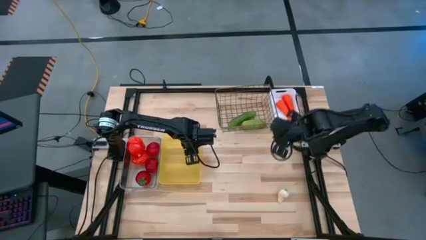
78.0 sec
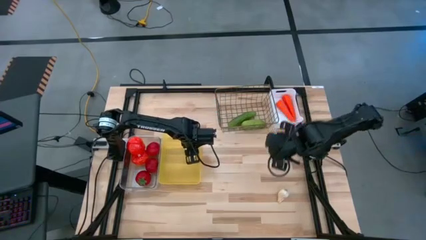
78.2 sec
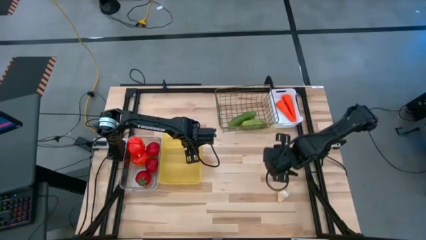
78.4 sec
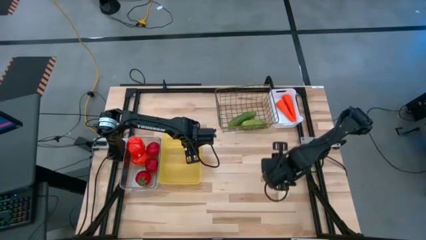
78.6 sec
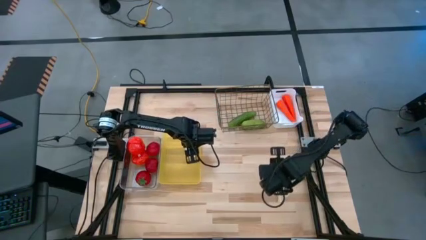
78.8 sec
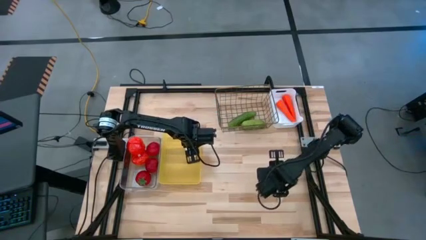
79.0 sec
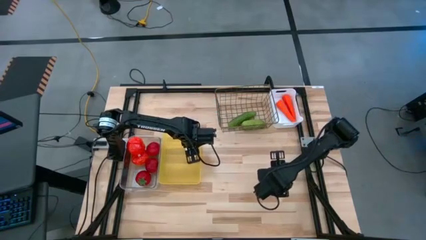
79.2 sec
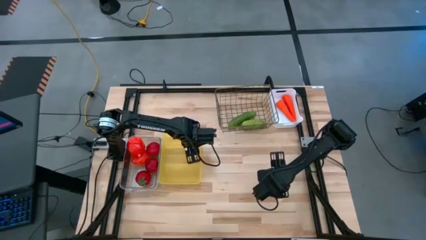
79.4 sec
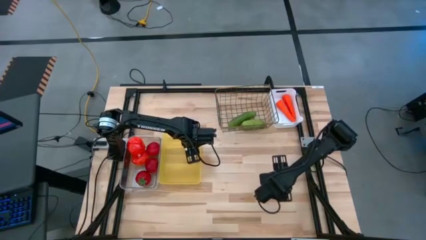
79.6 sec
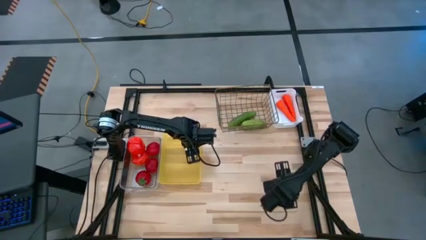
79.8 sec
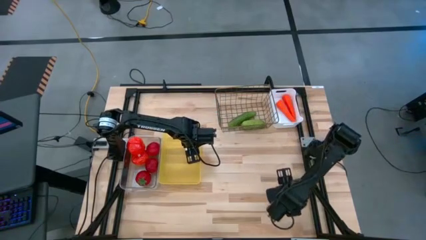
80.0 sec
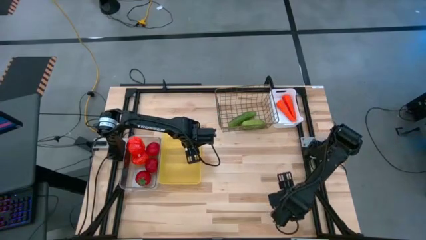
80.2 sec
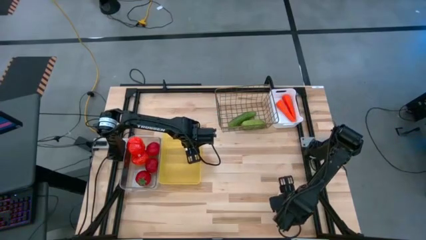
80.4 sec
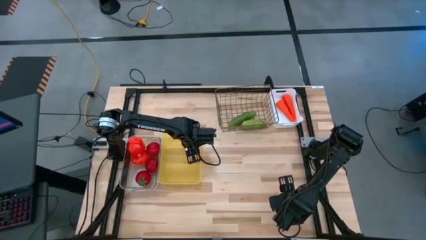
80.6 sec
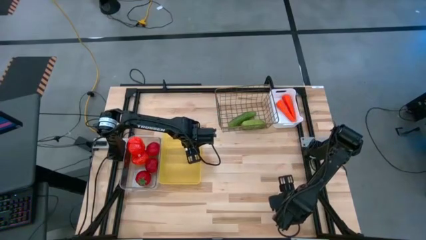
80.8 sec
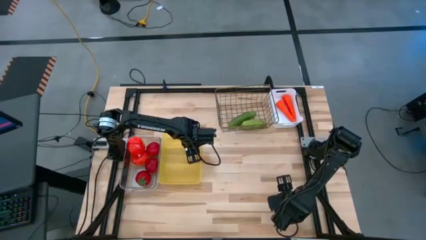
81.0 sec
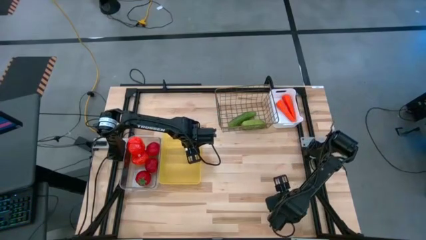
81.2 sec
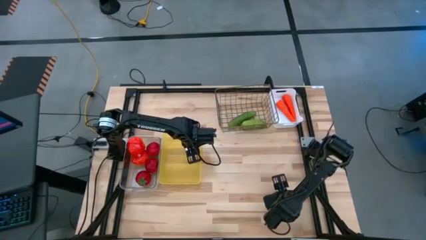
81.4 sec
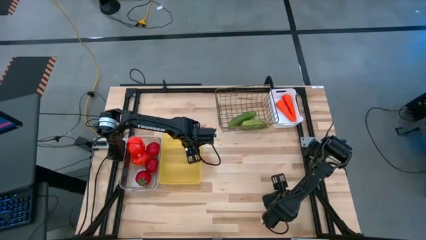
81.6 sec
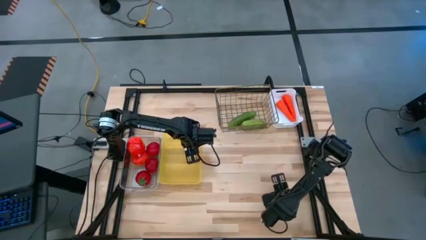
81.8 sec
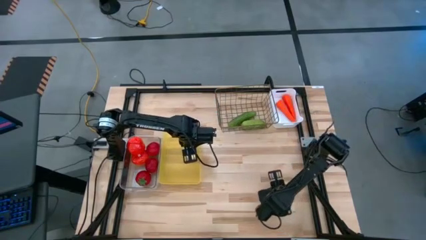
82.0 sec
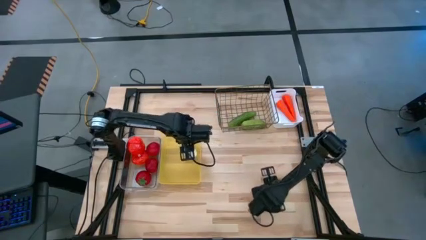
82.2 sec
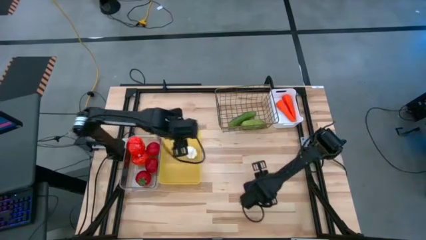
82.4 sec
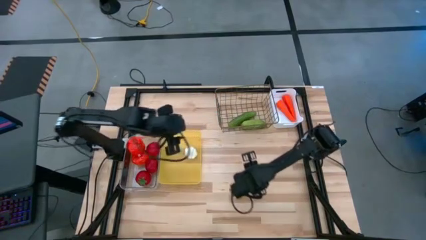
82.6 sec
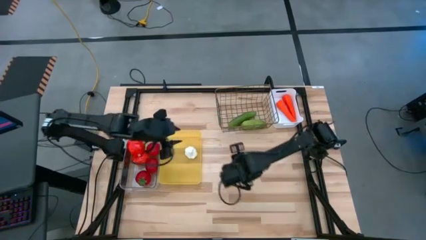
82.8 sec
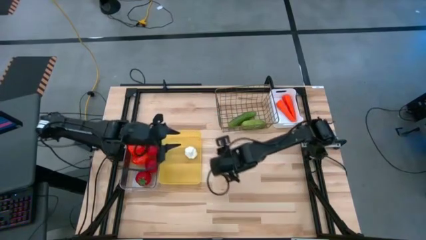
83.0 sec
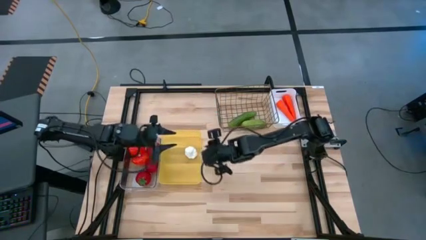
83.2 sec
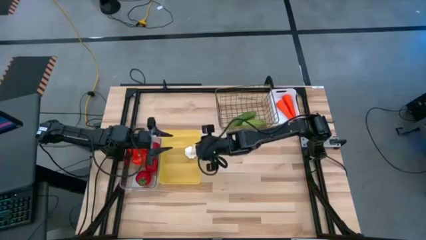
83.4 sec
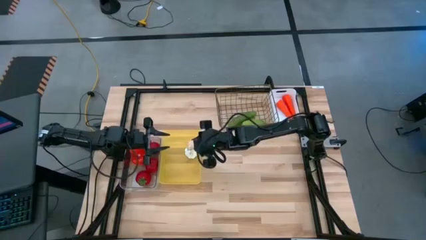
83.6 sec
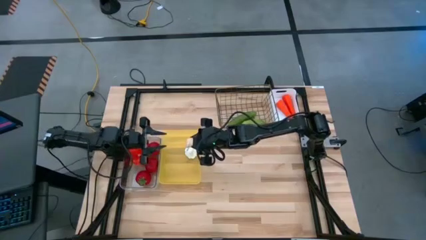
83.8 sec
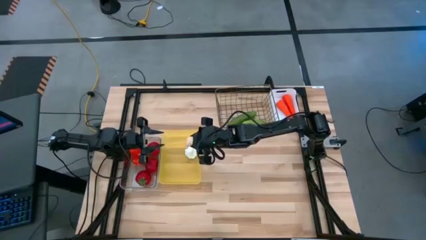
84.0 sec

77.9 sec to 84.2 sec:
Task: Sort produce into baskets
Put the white garlic into the yellow bin

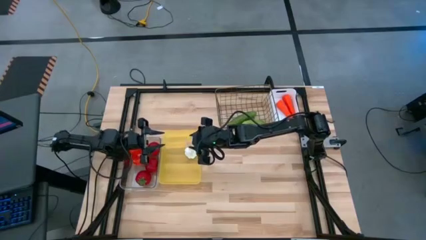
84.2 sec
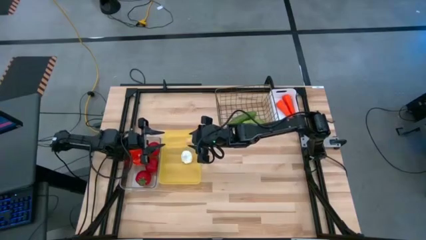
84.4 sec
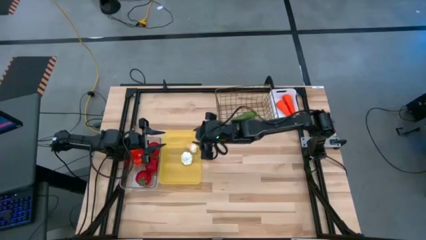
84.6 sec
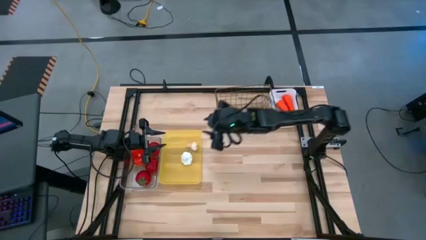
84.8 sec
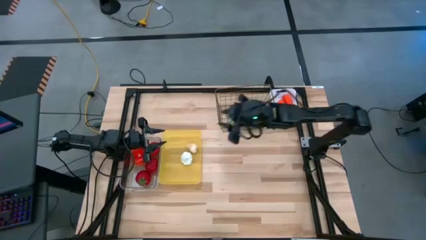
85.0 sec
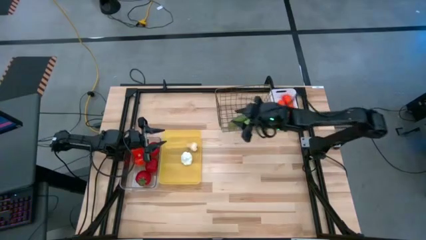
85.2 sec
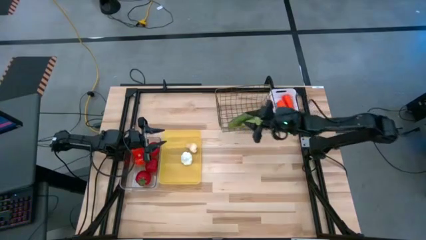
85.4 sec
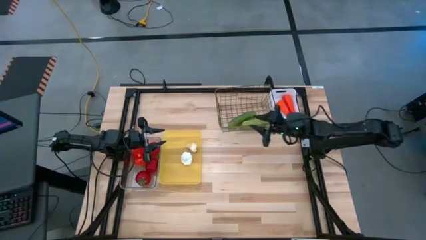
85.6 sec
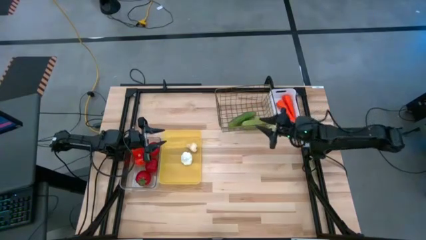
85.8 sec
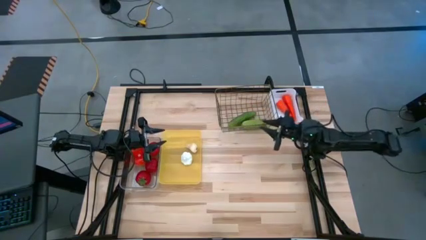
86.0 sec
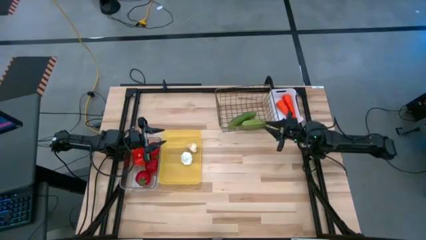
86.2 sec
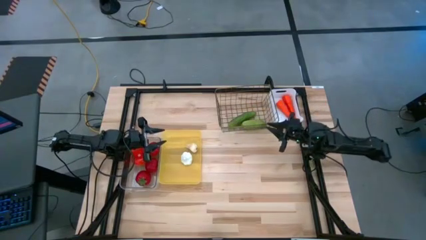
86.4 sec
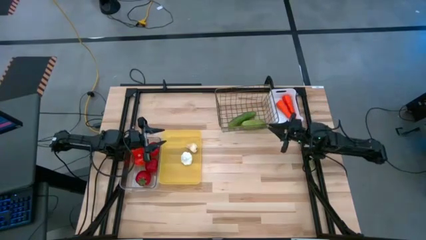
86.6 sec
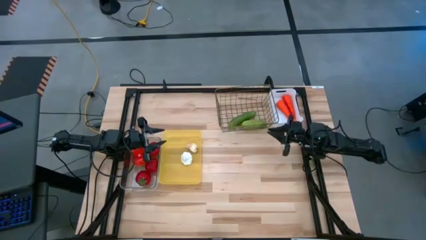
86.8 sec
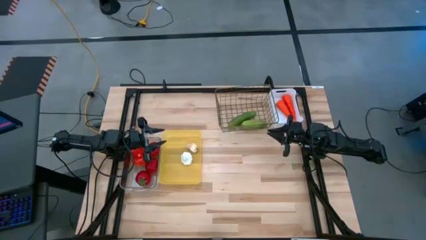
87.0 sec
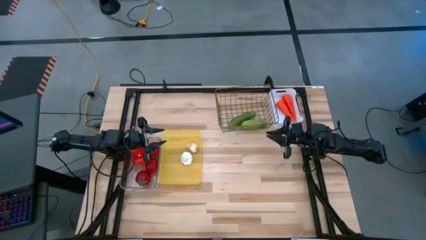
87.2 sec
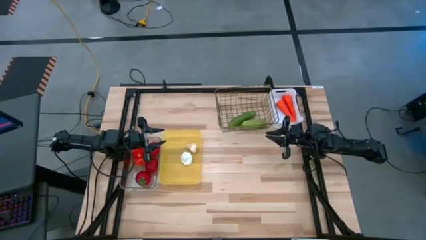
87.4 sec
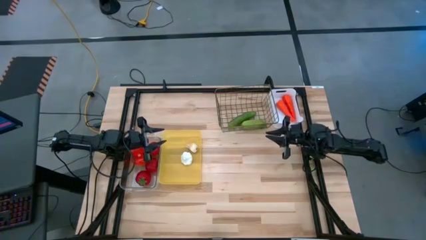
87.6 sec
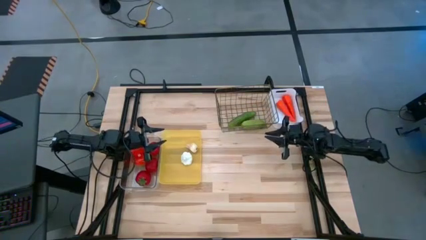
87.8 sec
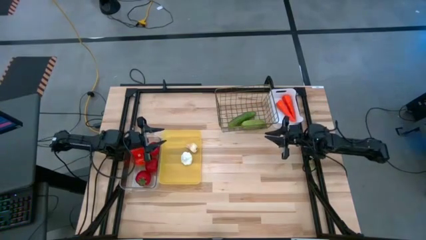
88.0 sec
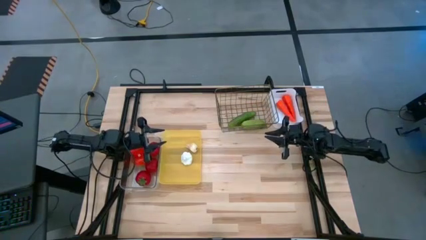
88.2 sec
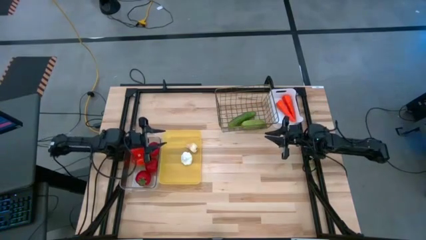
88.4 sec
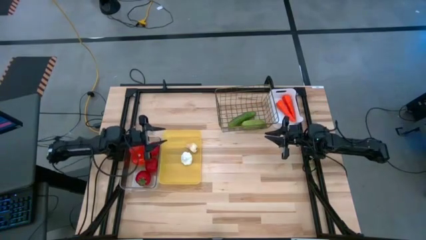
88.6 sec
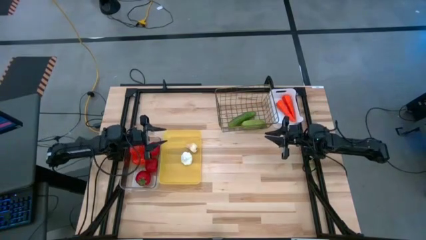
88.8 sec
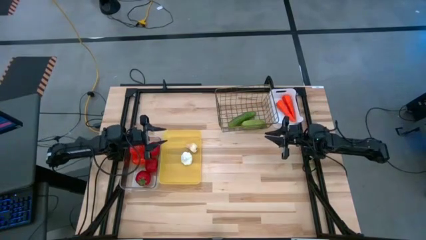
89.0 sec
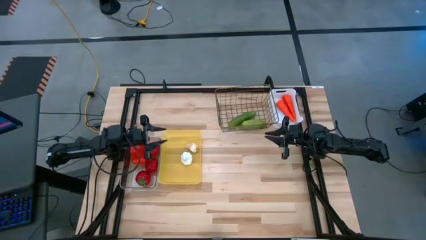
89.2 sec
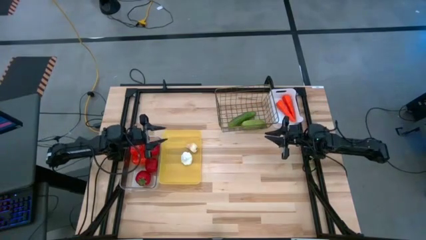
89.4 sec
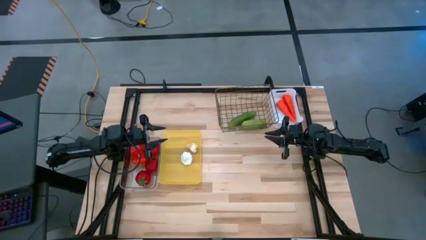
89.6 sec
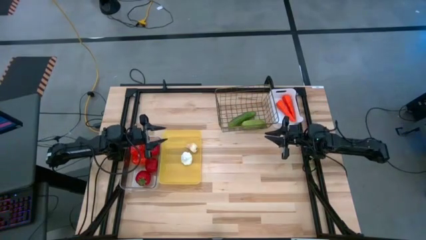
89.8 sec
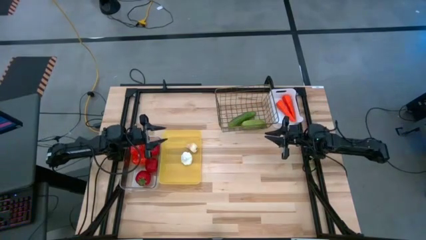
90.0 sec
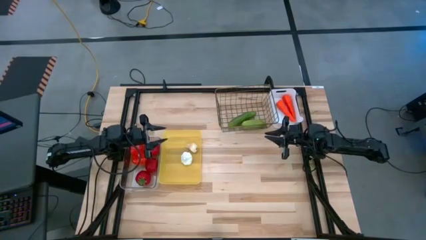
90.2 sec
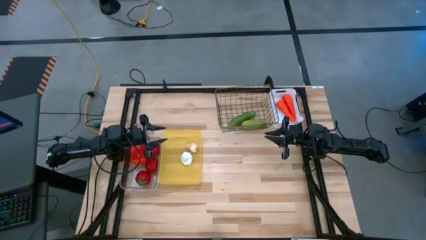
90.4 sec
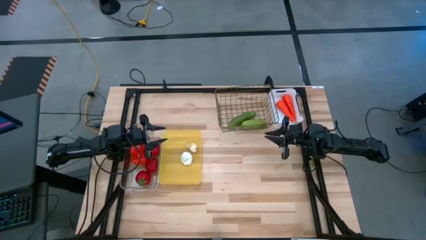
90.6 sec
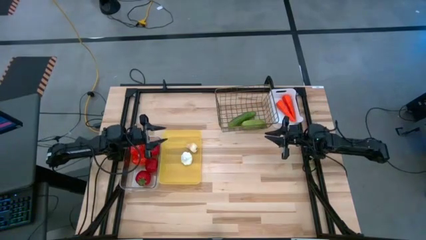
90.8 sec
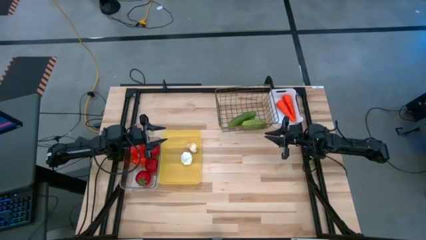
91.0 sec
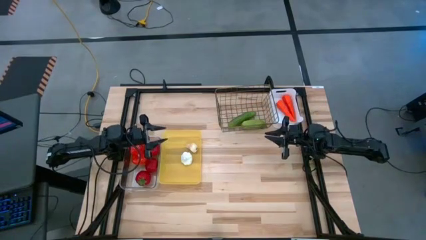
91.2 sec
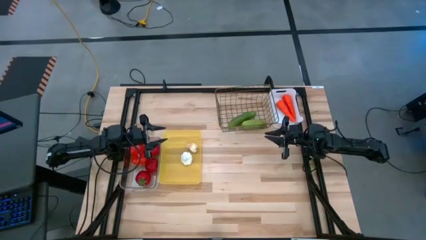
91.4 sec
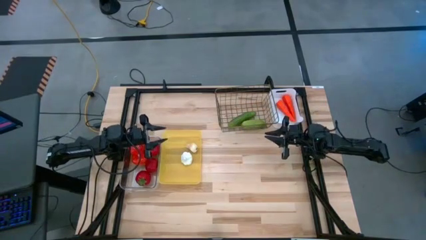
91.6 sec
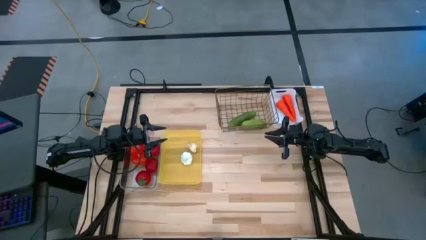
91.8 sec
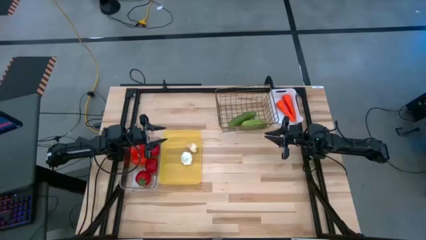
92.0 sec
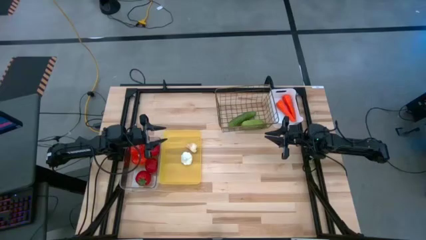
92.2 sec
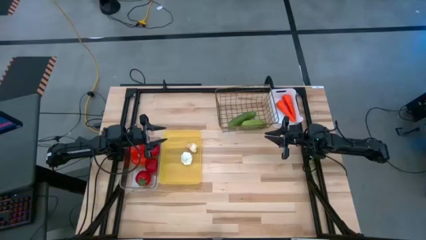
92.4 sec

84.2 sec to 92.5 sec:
Return to Home Position

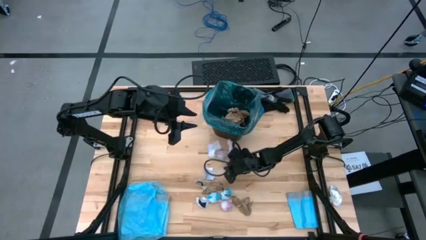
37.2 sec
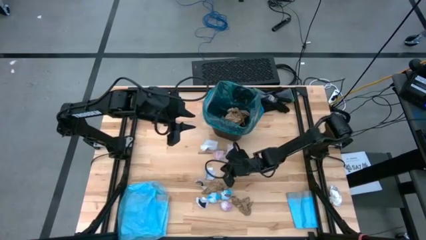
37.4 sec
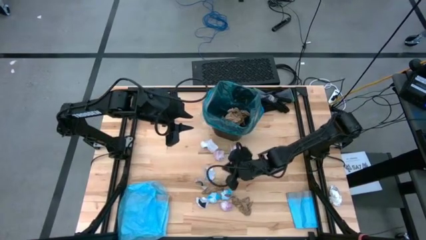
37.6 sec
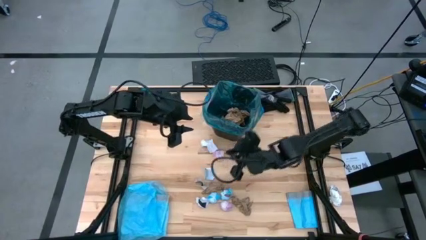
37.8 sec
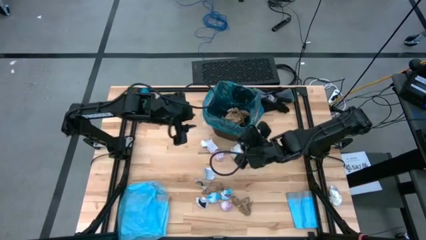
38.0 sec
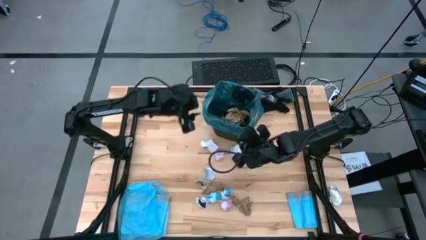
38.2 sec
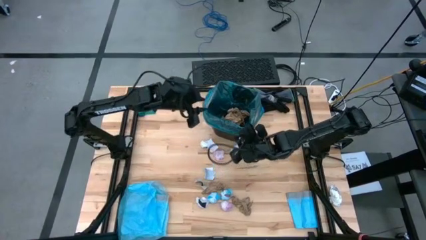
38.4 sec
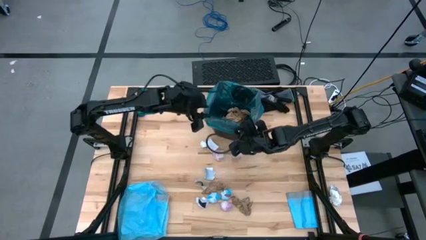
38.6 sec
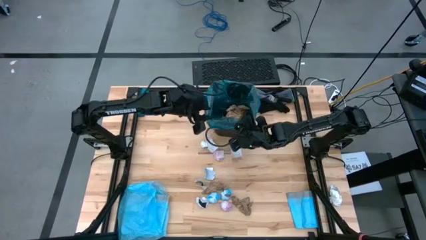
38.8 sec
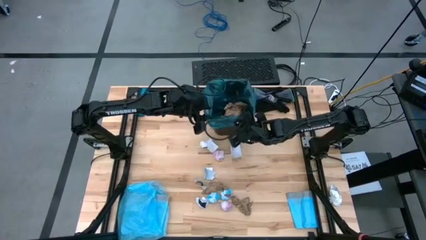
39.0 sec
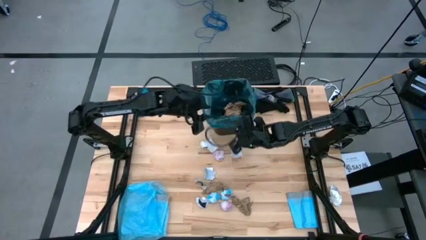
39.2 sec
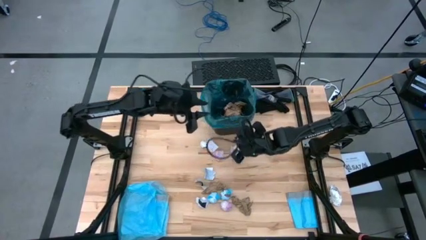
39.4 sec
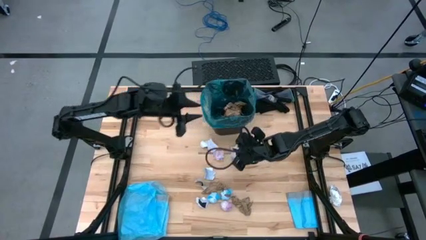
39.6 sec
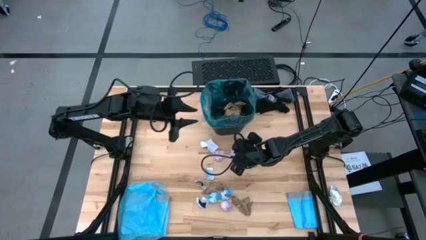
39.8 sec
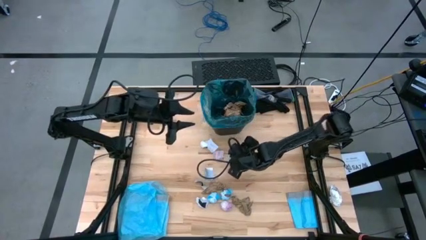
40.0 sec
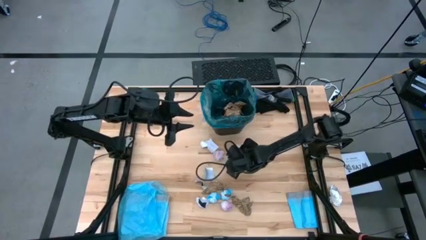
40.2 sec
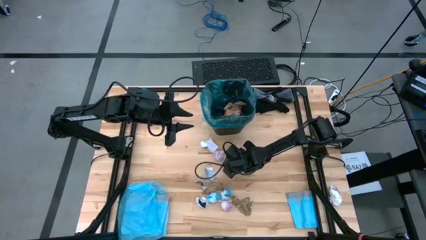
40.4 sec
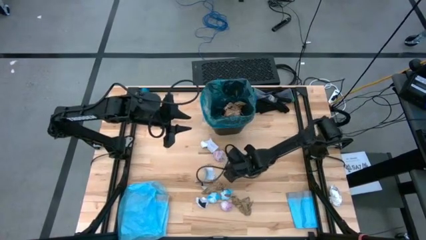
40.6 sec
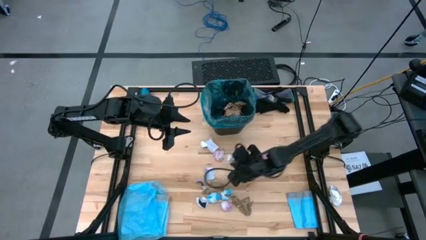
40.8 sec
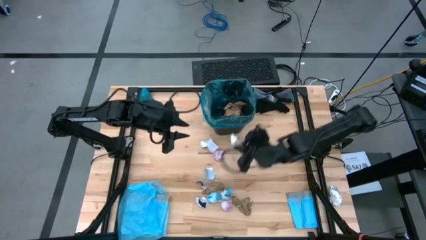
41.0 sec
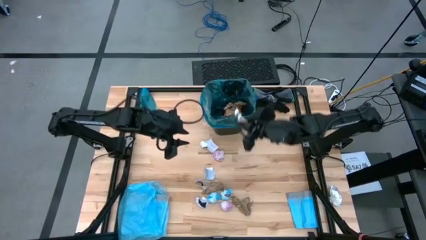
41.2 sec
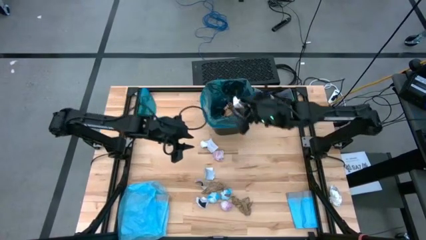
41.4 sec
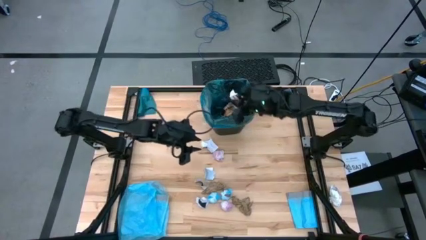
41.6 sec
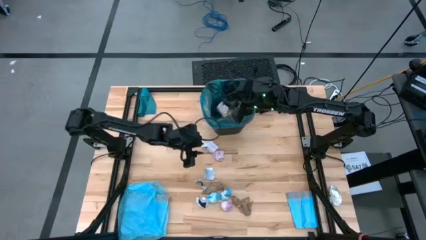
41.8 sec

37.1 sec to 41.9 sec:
Task: place trash/remove bag and relplace
Put the white paper into the blue trash bag inside the black trash bin
